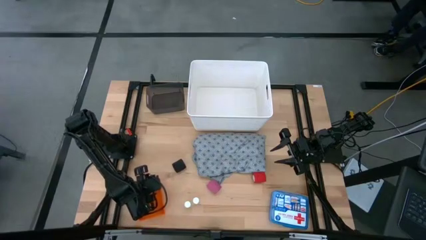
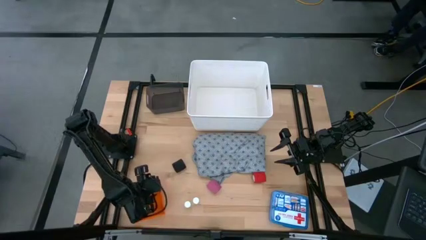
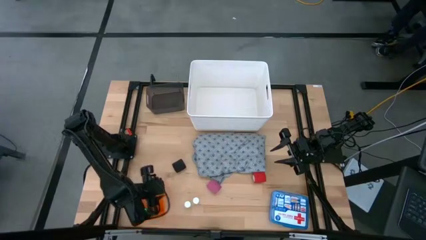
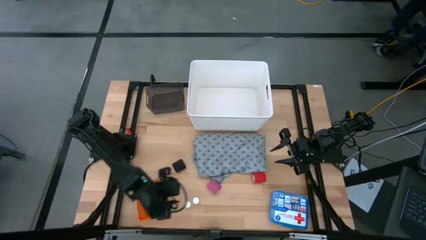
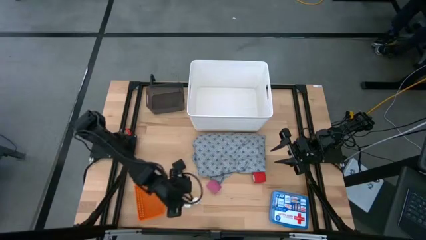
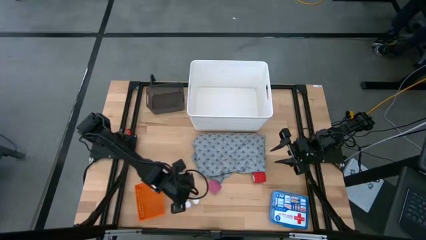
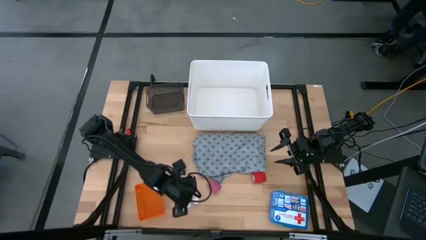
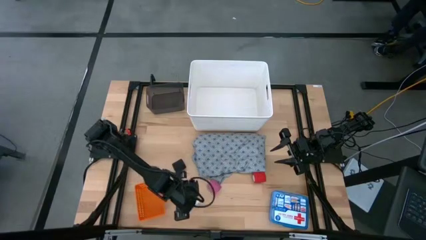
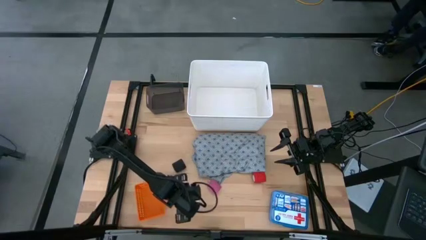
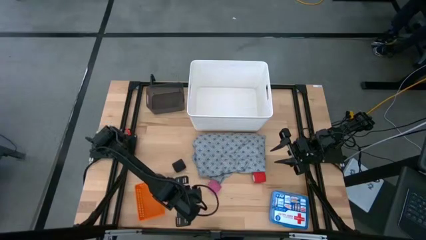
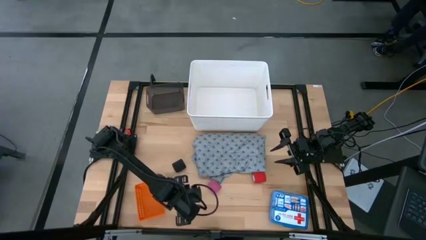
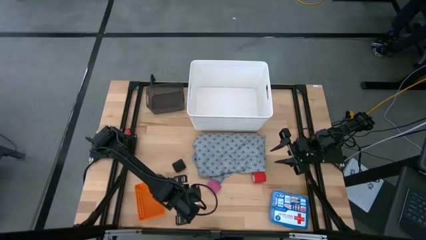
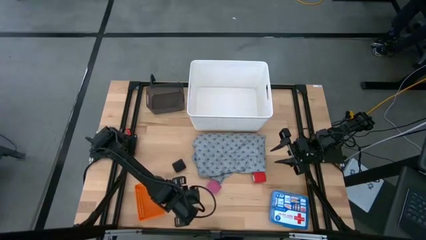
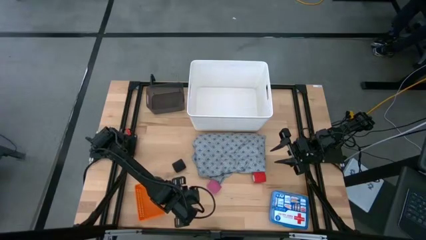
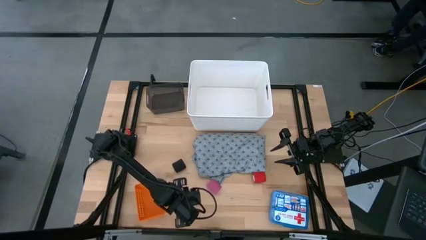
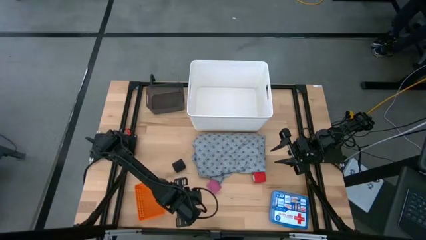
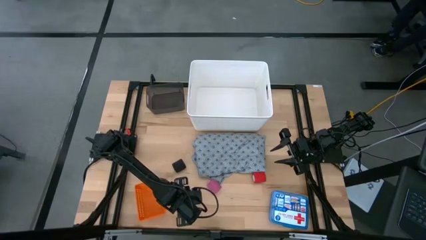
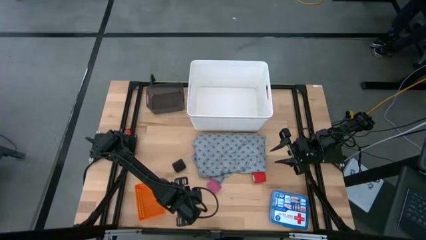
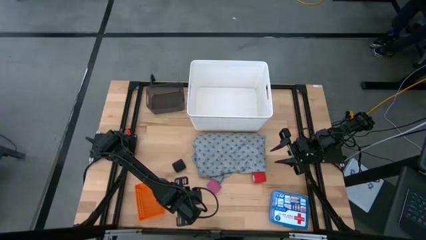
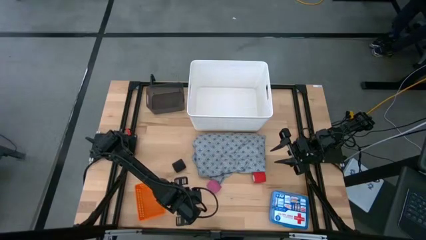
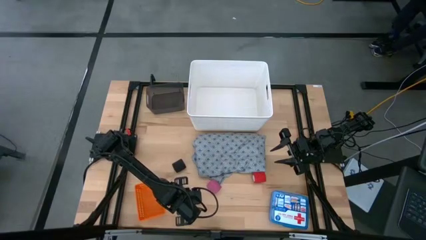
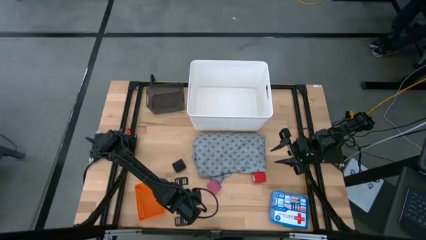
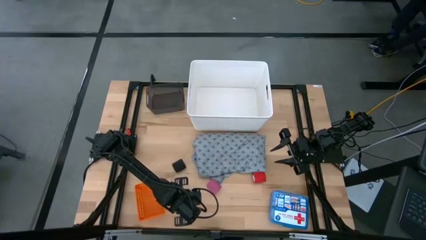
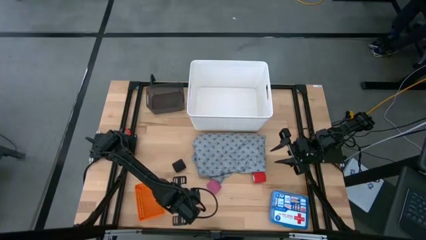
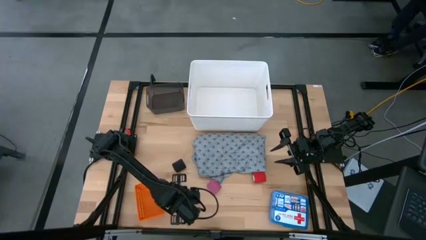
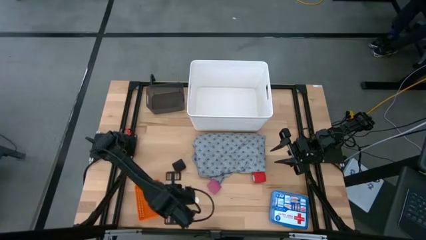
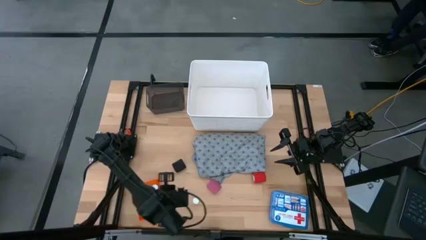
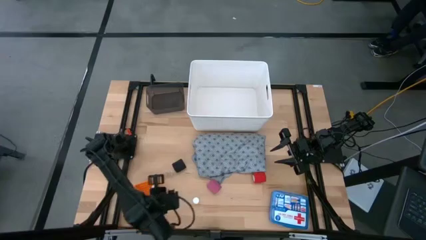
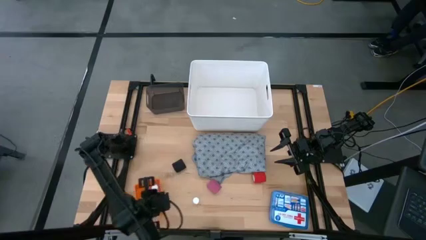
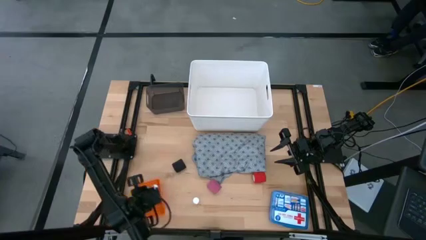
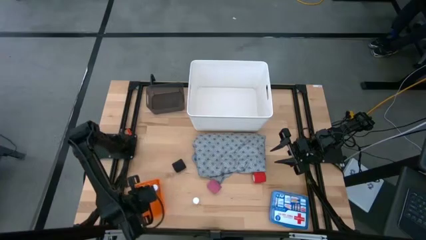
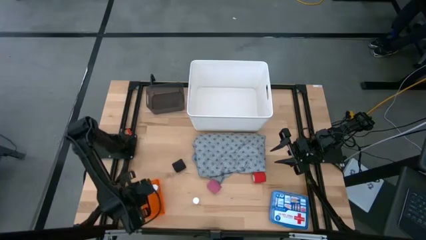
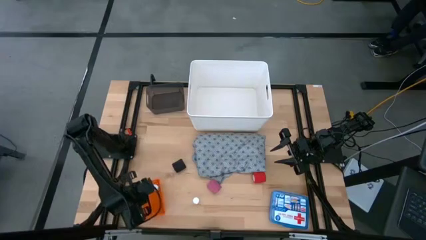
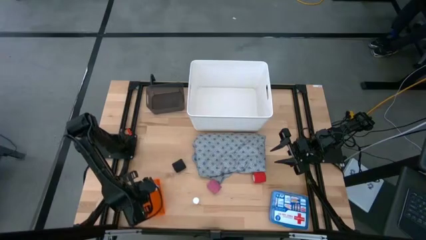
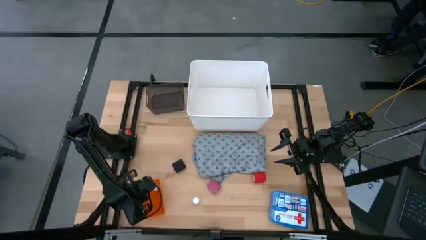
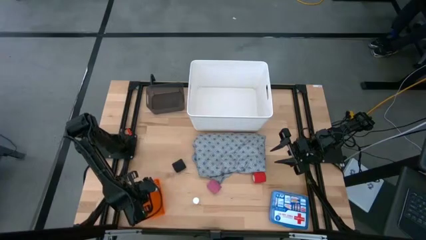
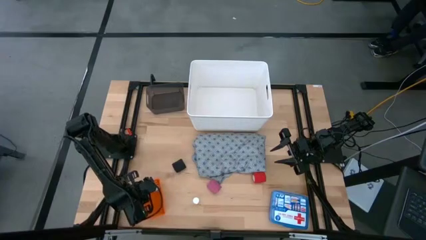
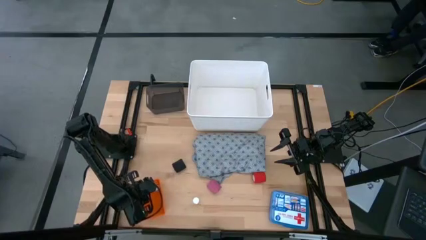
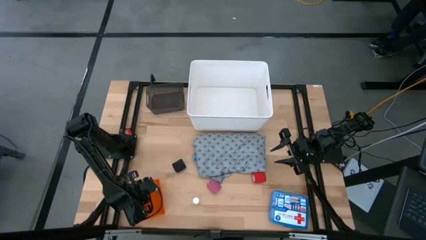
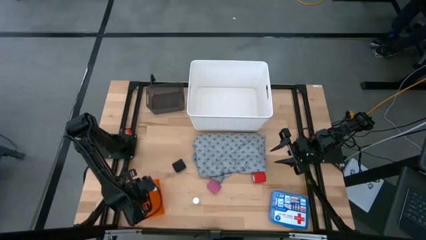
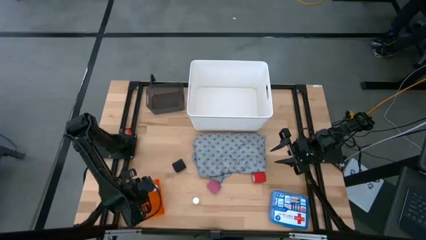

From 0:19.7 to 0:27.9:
Task: Pick & Place Medicine items
Put the left yellow pill bottle into the orange bin

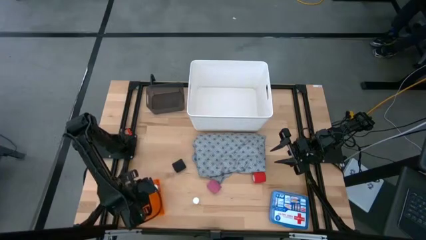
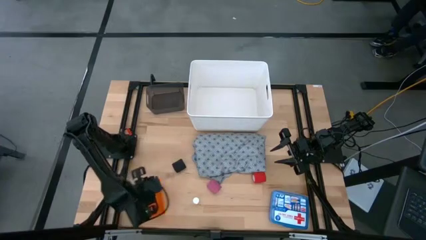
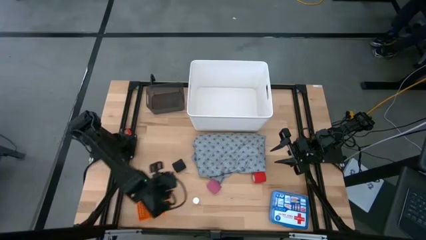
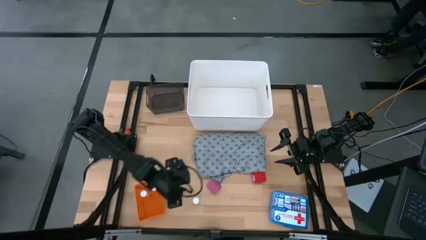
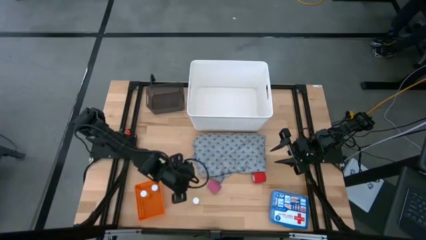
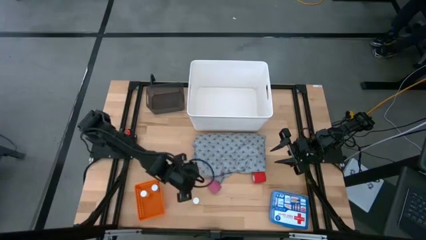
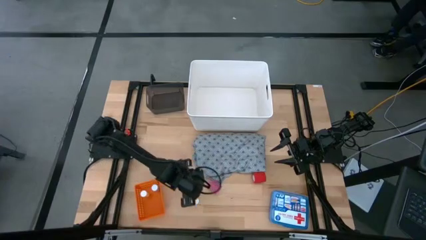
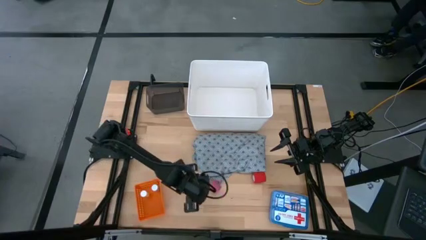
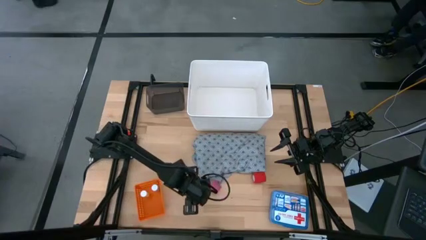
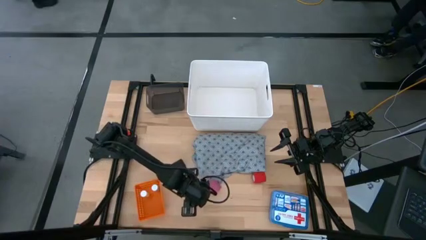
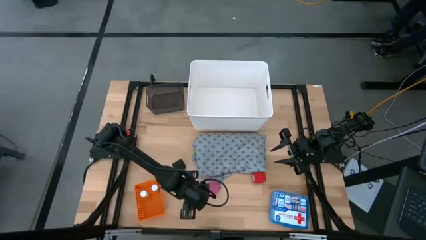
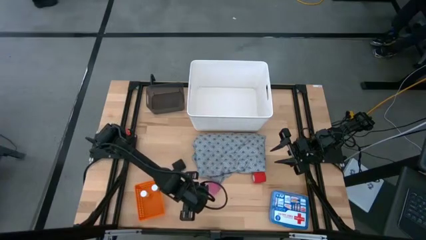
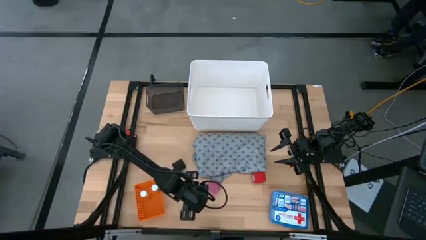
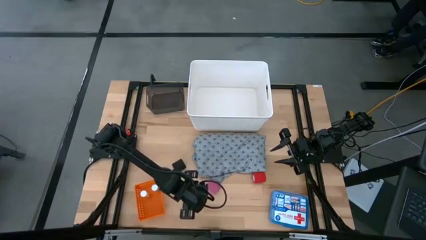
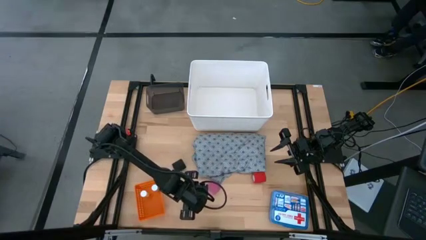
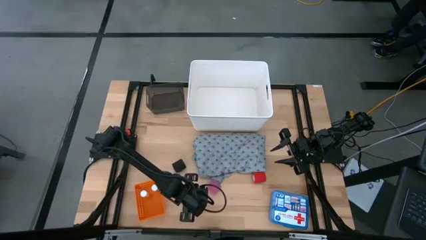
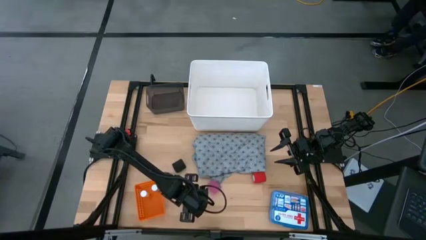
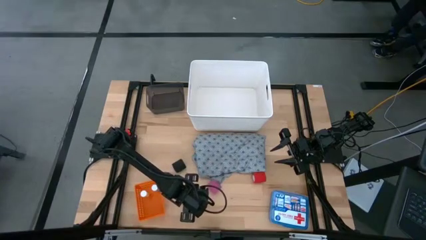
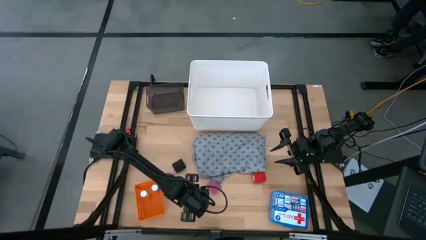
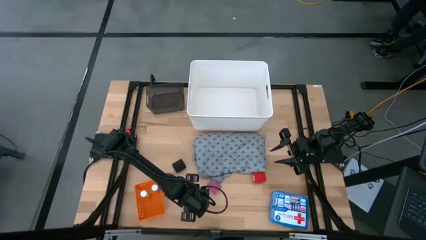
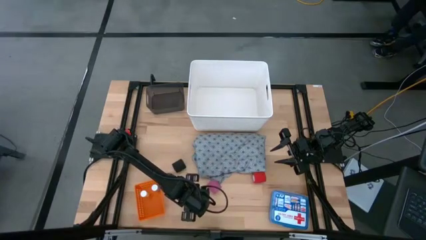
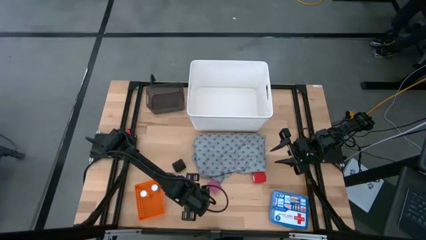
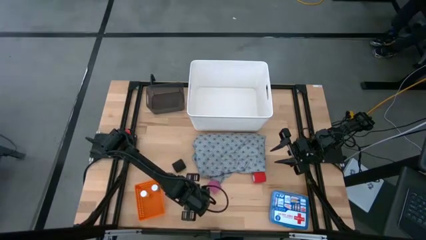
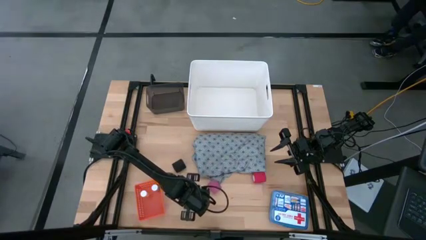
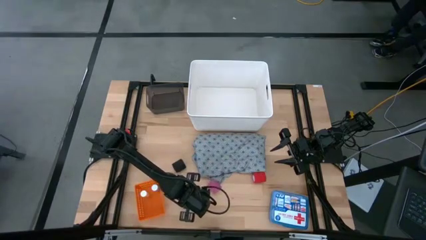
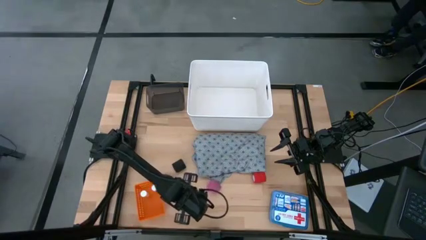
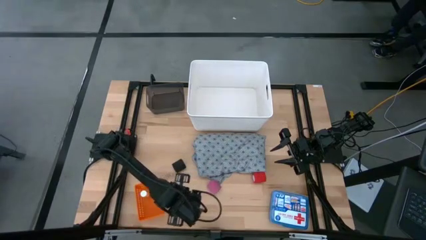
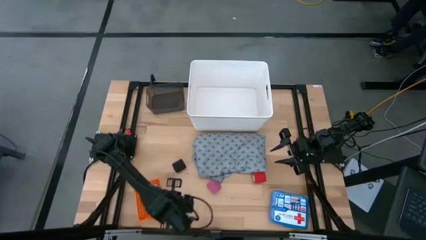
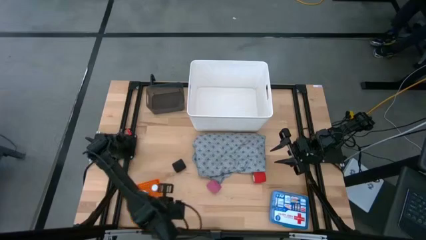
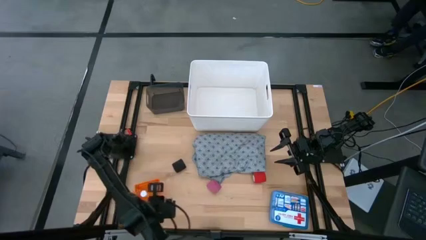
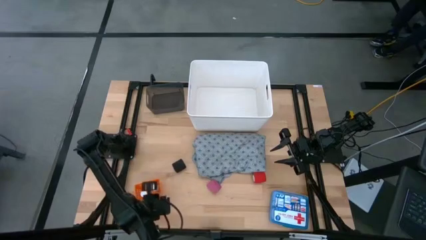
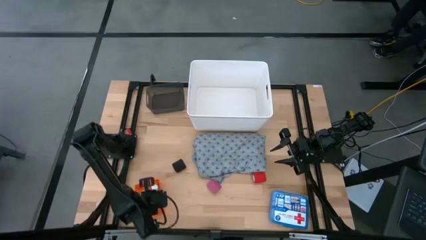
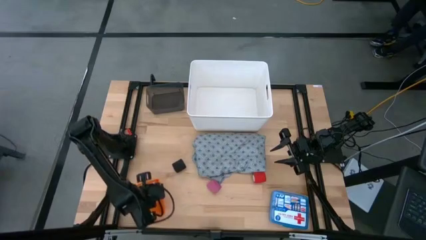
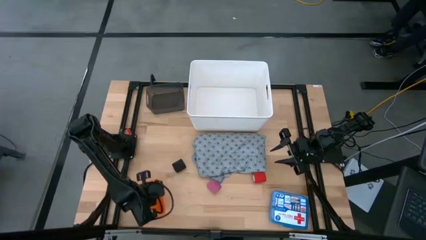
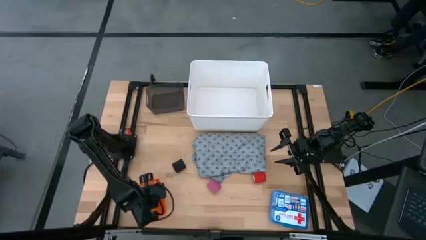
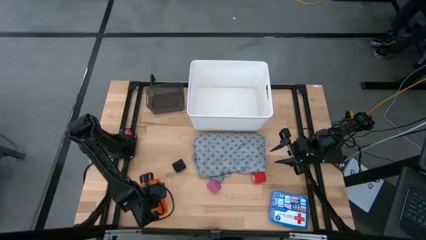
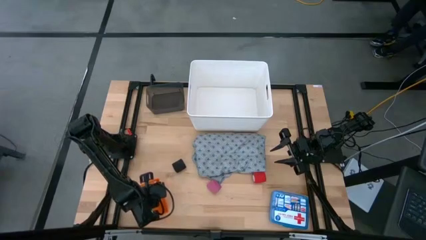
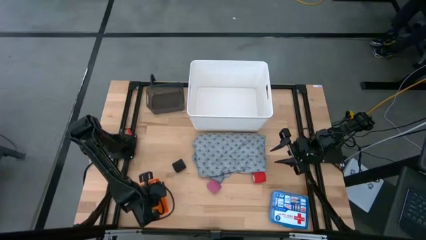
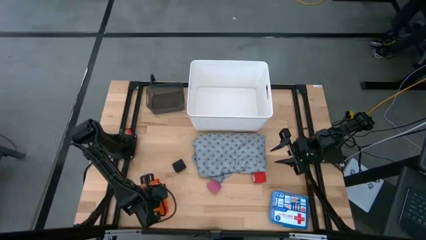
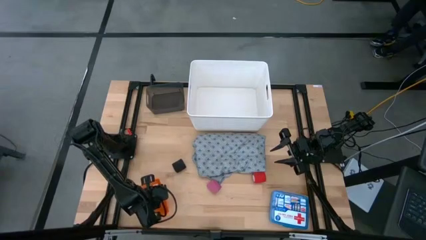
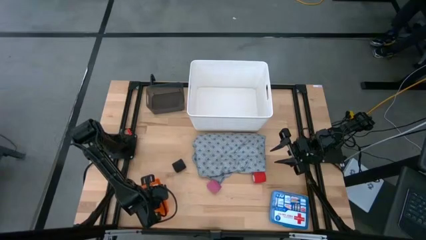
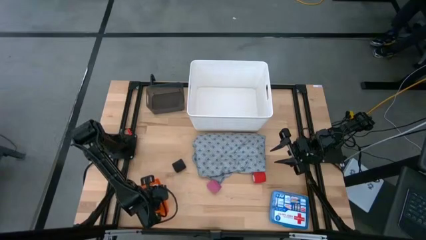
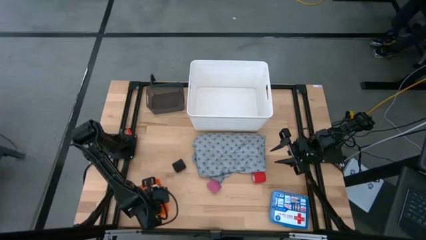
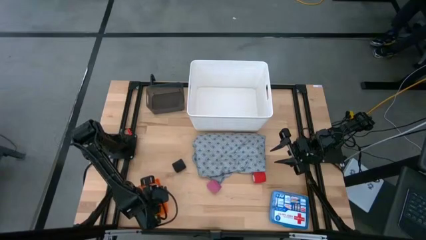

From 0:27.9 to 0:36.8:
Put the yellow pill bottle into the orange bin
